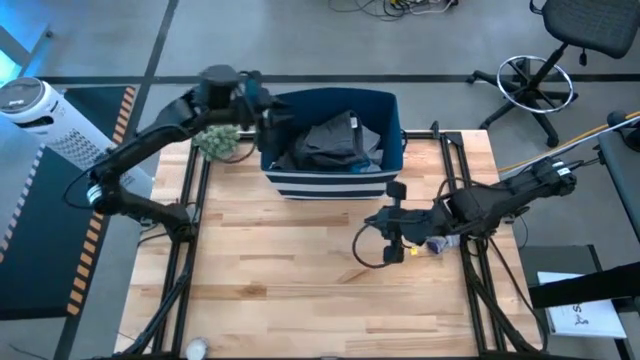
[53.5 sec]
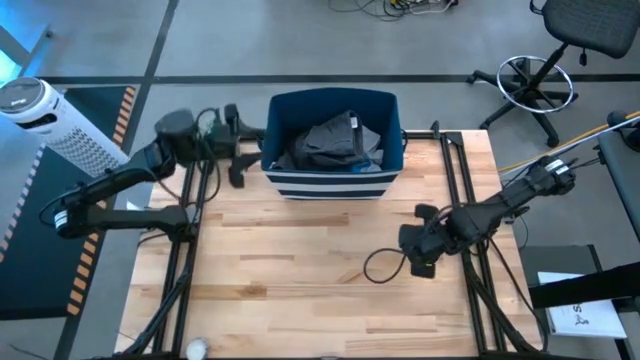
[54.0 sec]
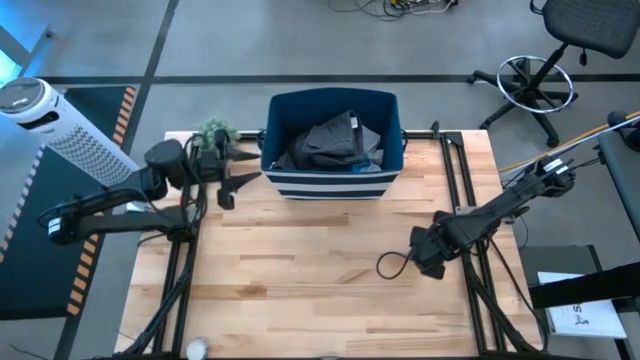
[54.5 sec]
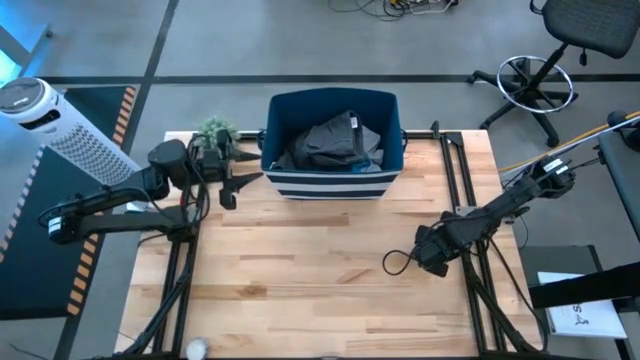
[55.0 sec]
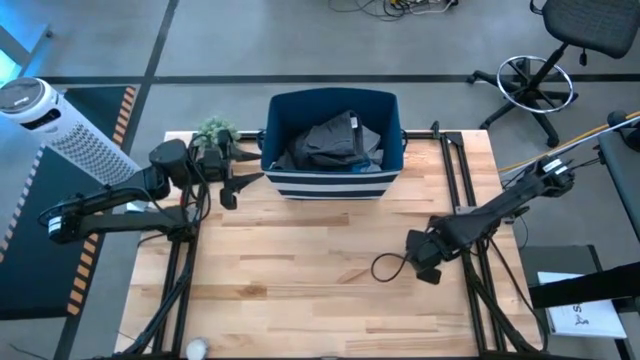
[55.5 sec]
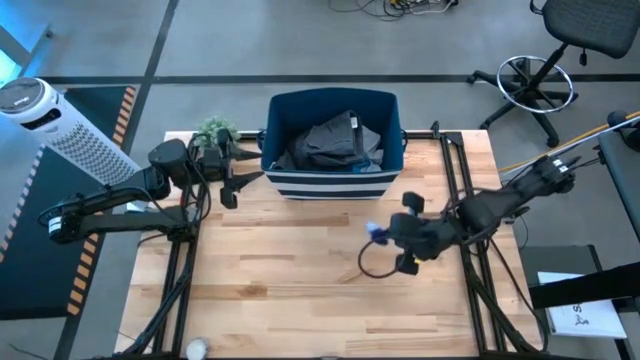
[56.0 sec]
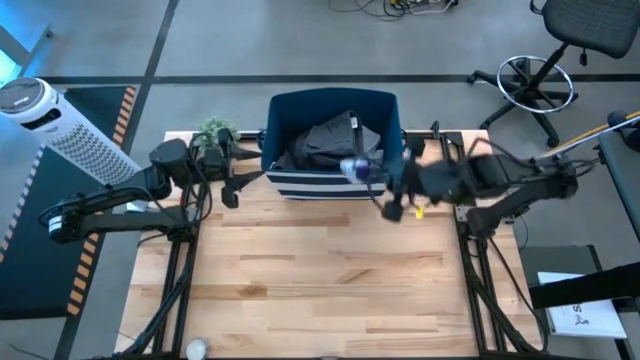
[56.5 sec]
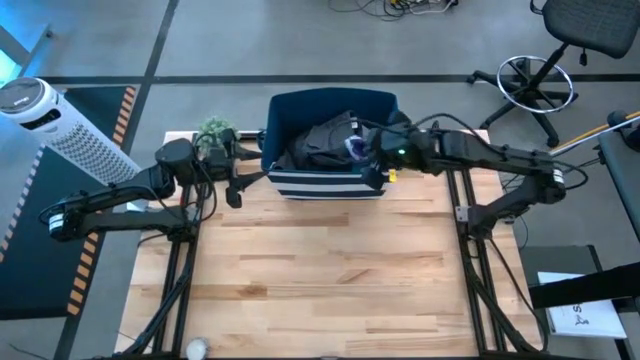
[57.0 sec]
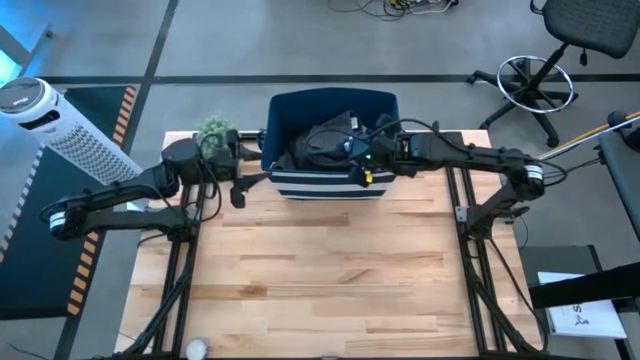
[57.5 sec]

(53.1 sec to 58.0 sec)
Task: Sort clothes
Put the gray socks into the laundry bin

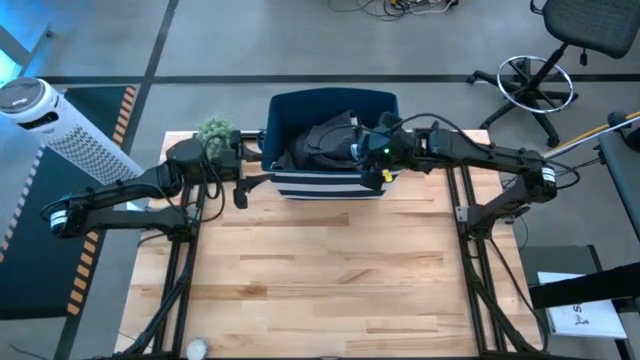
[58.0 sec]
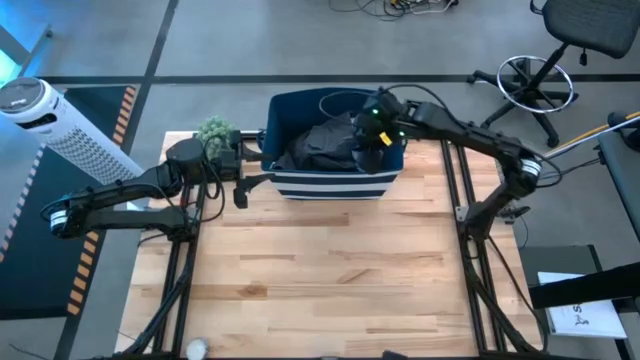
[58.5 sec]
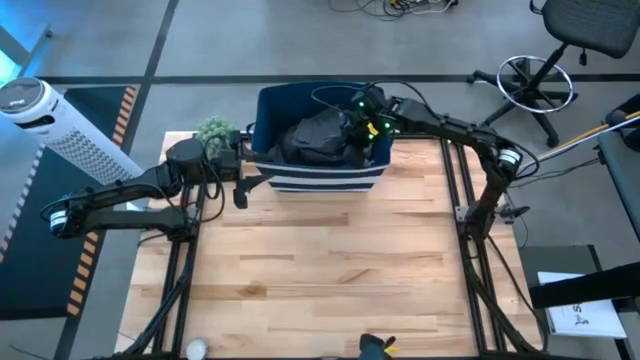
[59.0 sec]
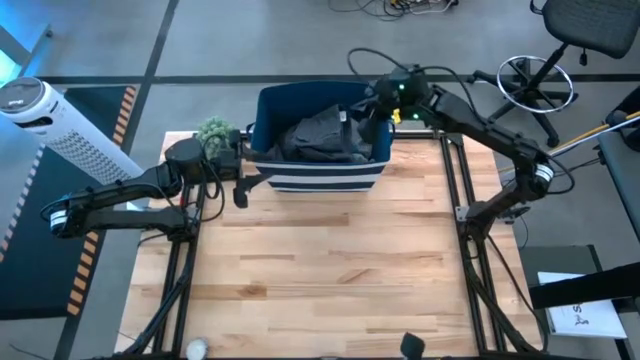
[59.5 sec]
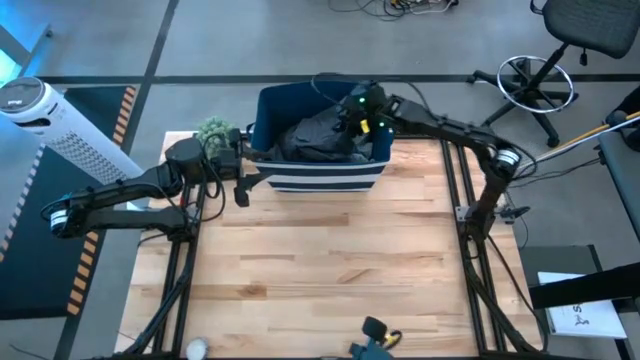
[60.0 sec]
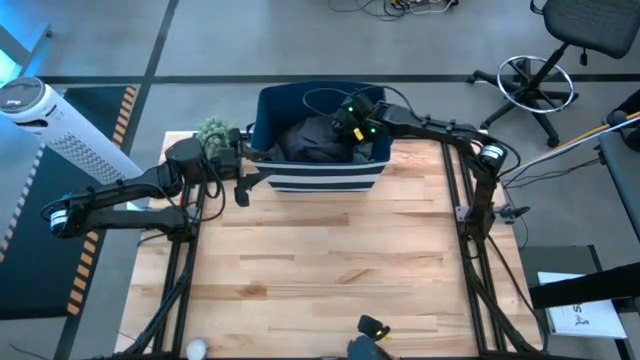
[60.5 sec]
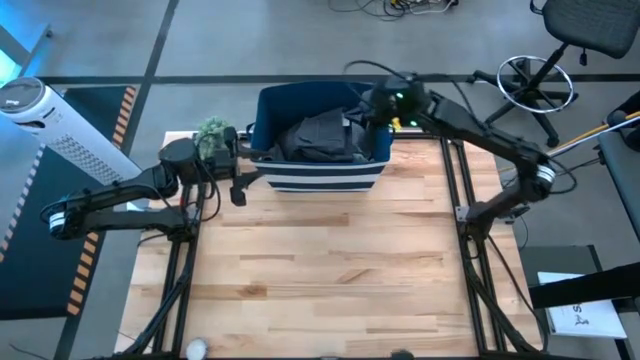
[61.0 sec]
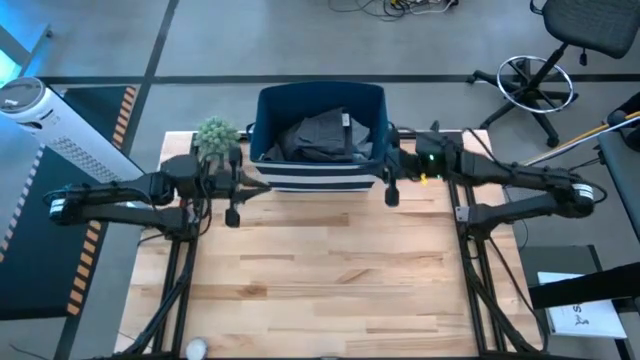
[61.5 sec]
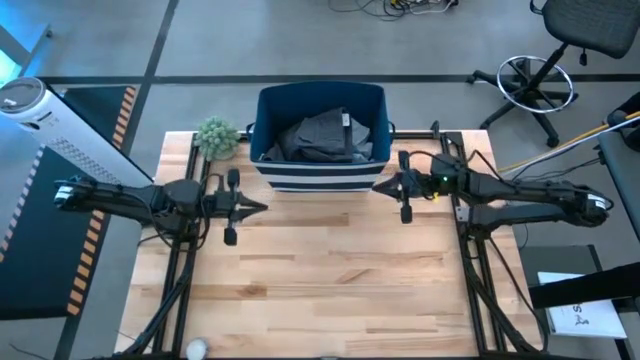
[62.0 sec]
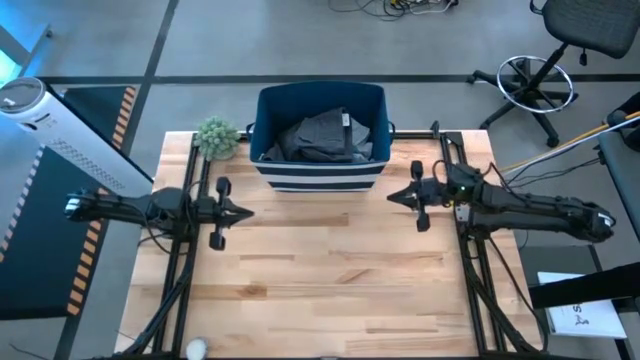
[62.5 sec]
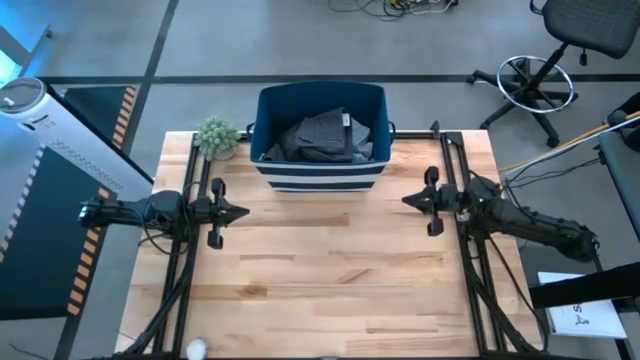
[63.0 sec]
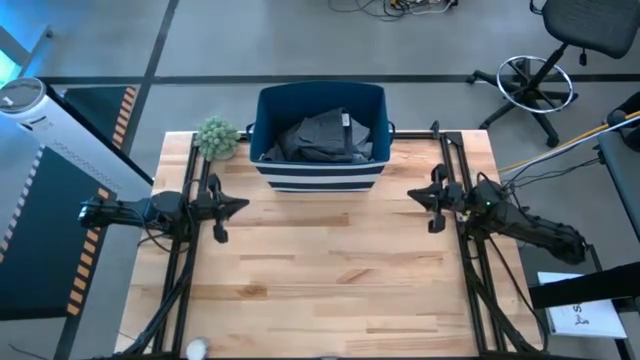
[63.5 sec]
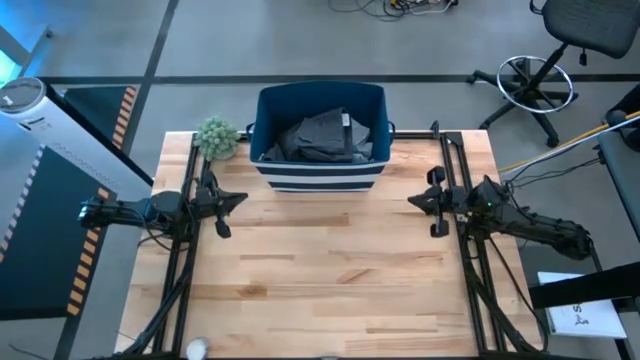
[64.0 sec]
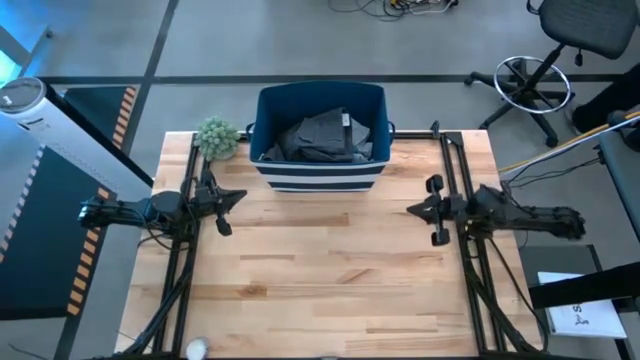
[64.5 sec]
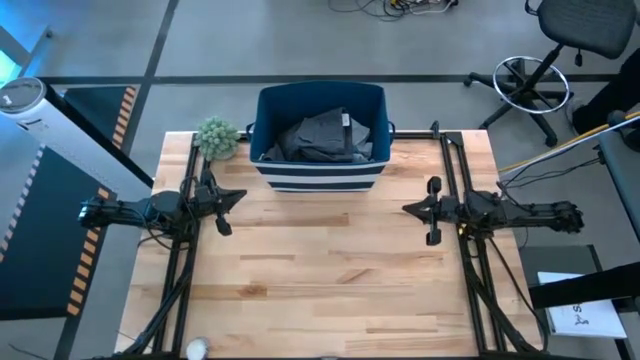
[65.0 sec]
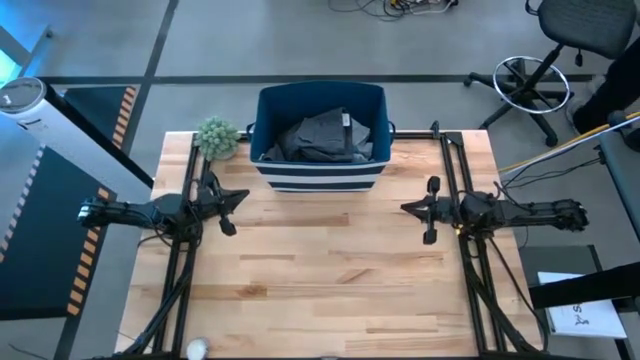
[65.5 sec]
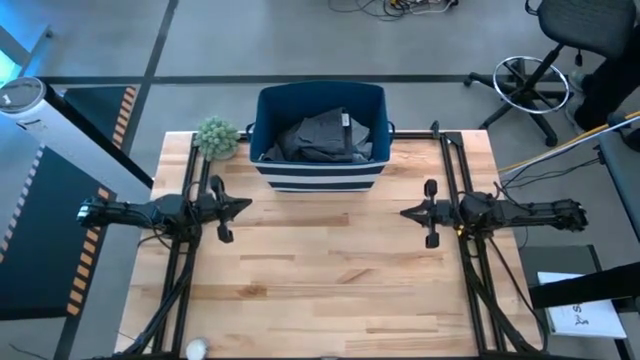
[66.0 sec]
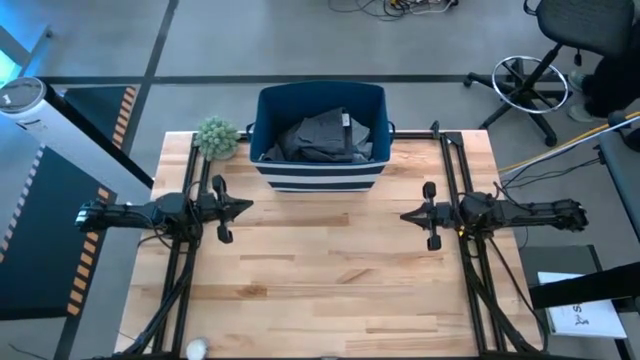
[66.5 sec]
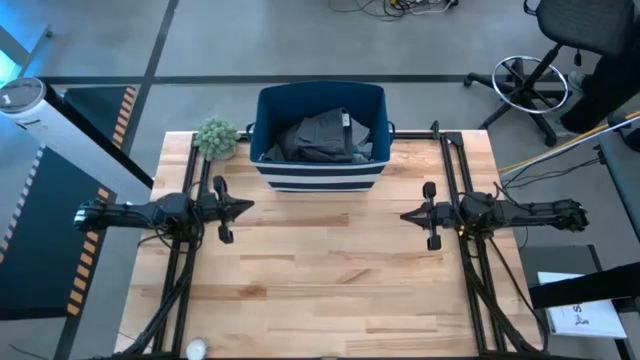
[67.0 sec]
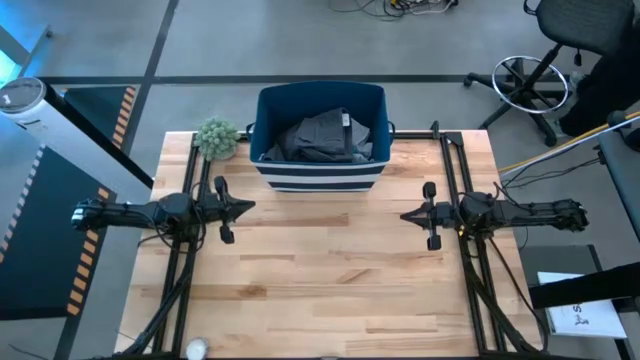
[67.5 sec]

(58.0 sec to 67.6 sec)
Return to Home Position

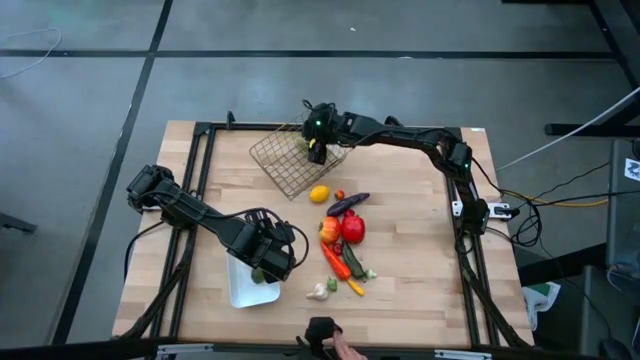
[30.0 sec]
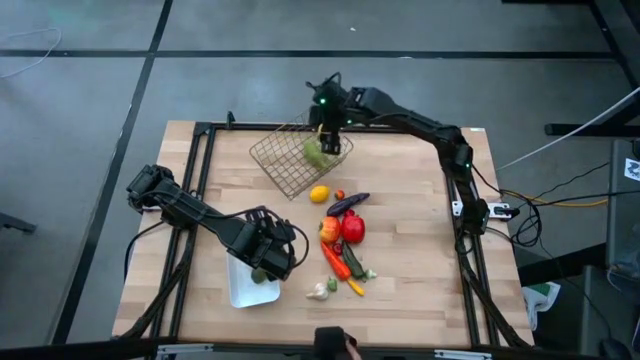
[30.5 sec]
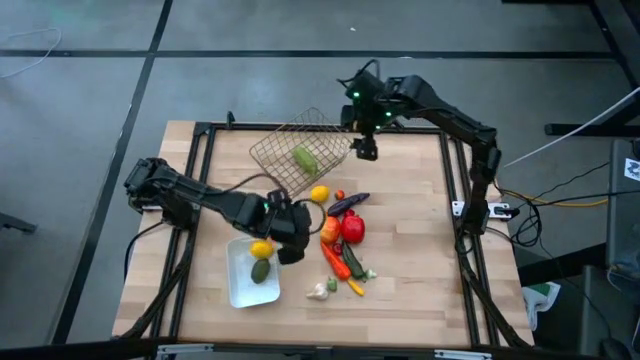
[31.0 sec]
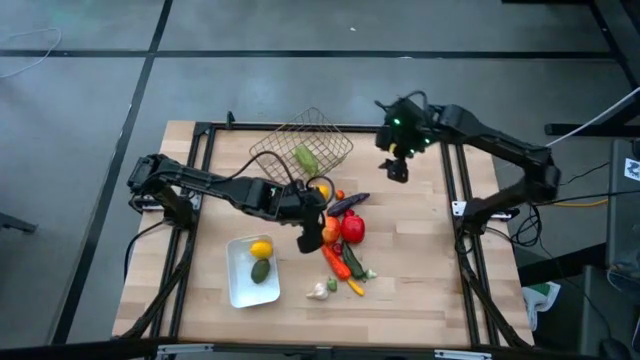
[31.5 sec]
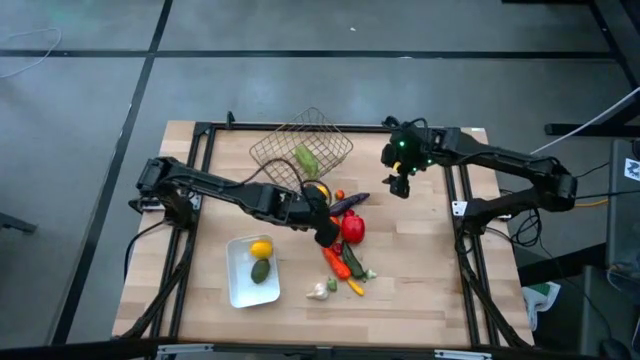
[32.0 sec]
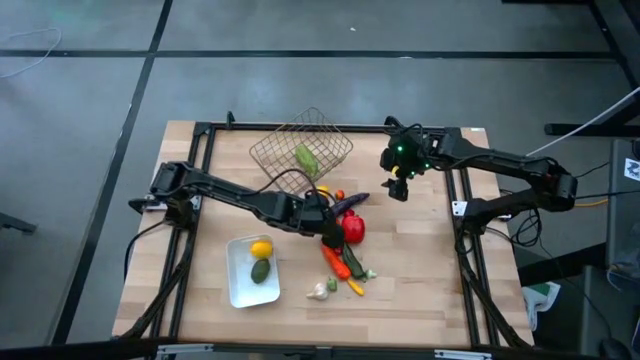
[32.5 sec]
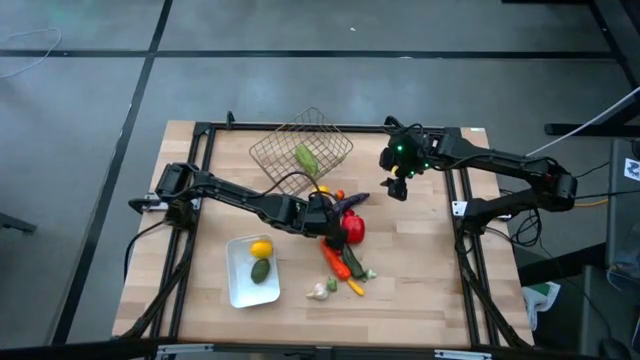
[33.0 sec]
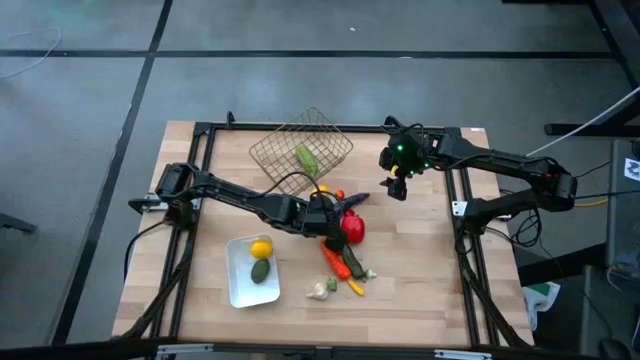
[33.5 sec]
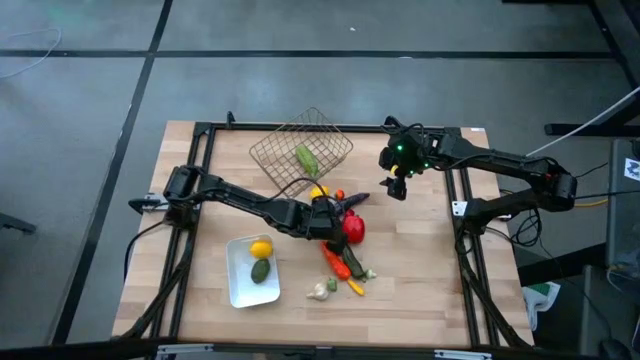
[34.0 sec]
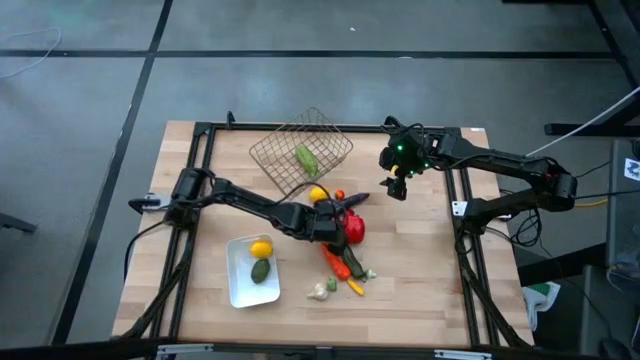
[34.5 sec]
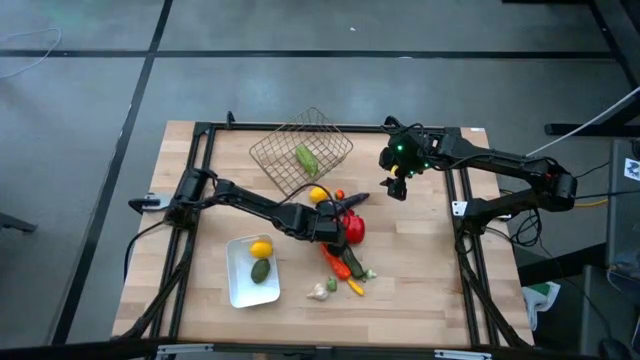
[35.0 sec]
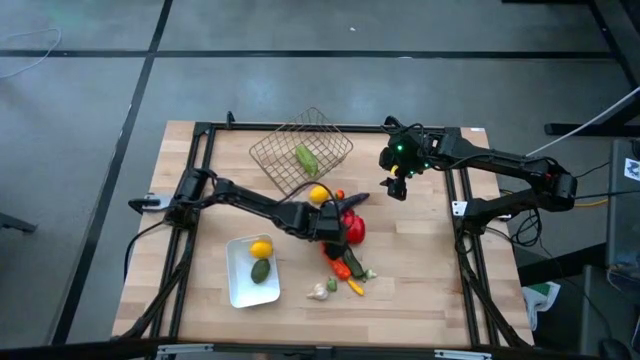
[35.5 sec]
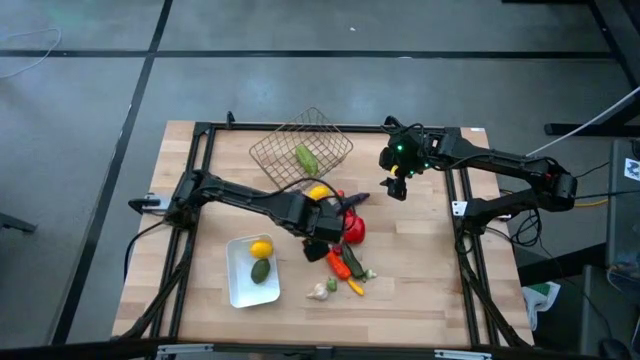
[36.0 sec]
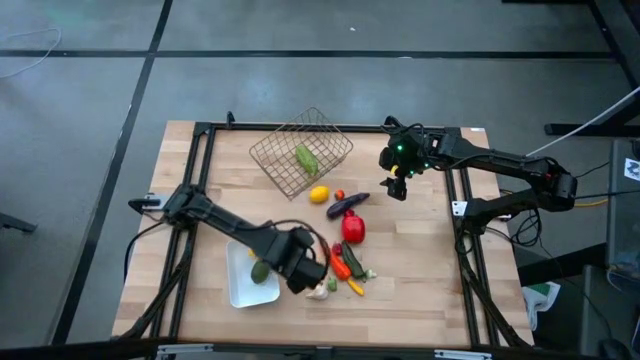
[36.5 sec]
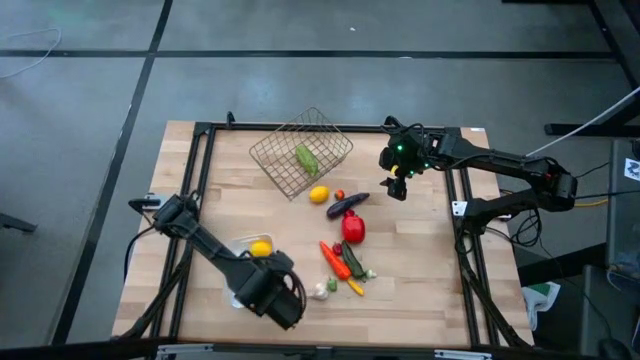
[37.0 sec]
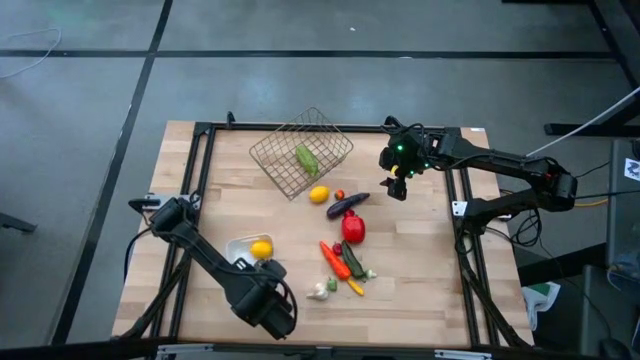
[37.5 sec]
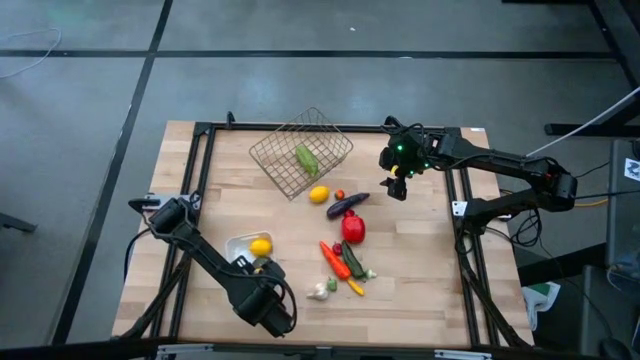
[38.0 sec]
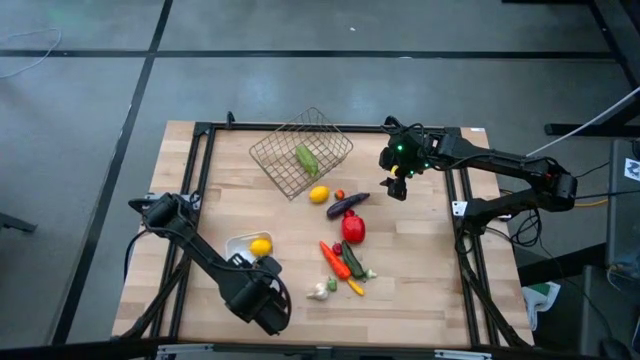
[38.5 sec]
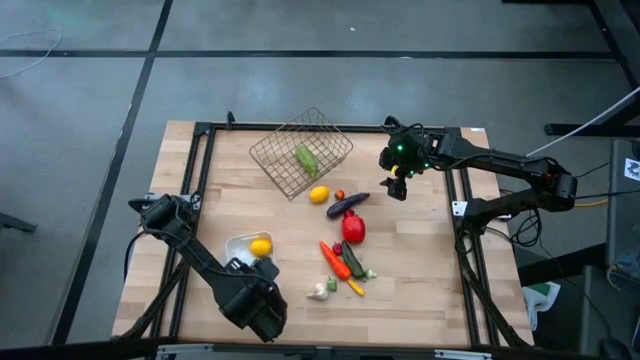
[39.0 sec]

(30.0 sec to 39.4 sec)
Task: Sort produce into baskets
Put the big orange persimmon into the white bin
